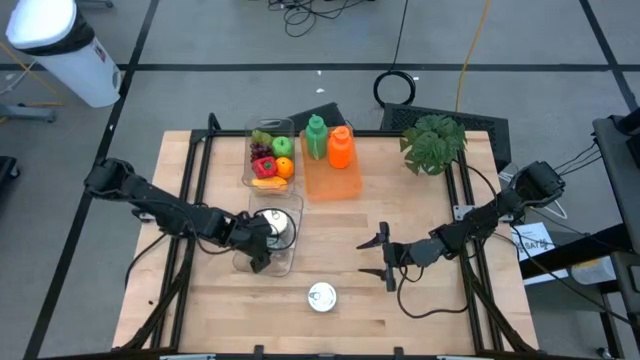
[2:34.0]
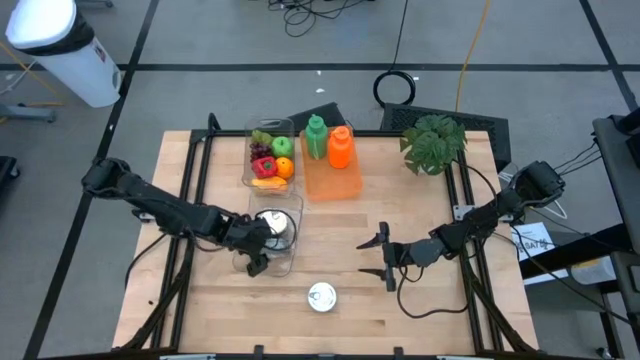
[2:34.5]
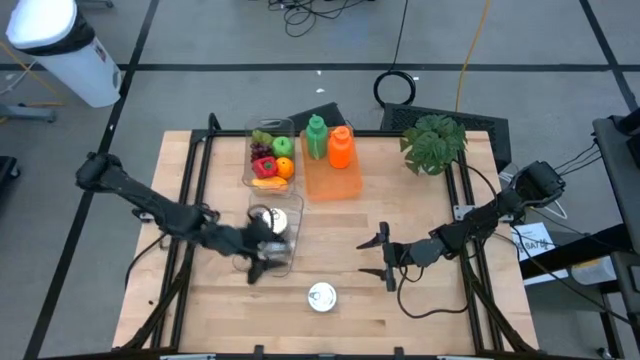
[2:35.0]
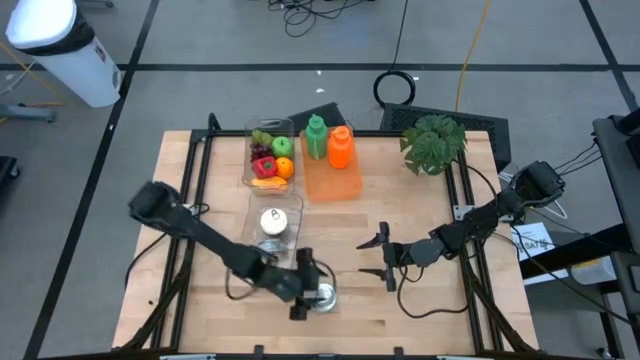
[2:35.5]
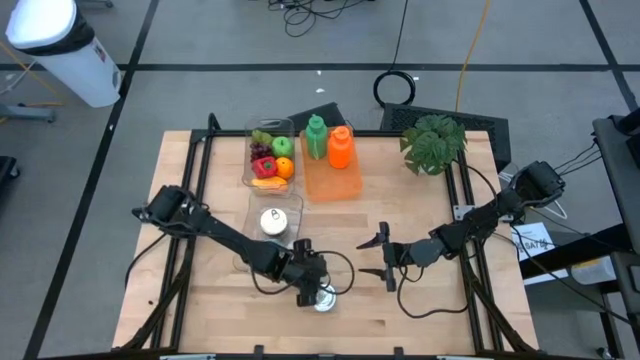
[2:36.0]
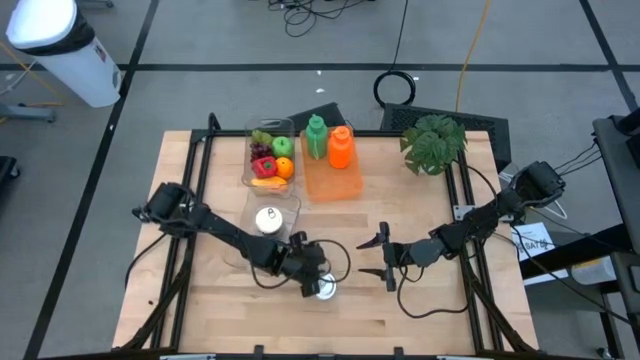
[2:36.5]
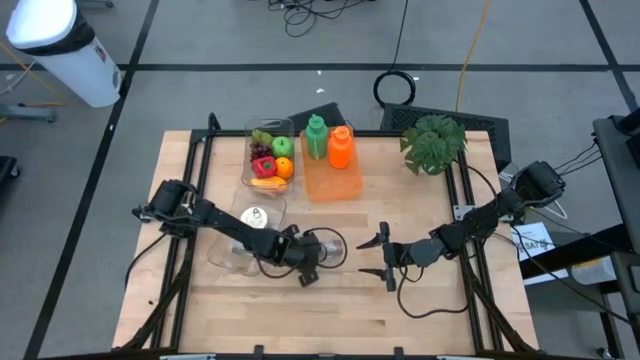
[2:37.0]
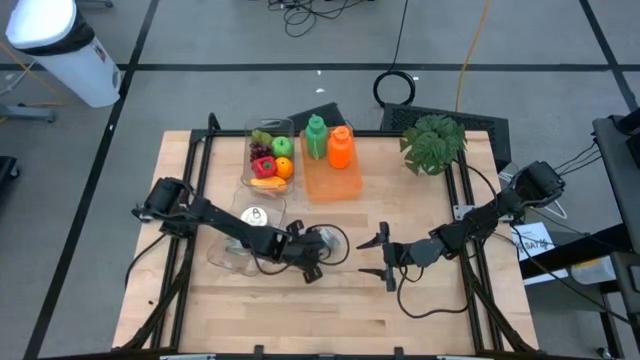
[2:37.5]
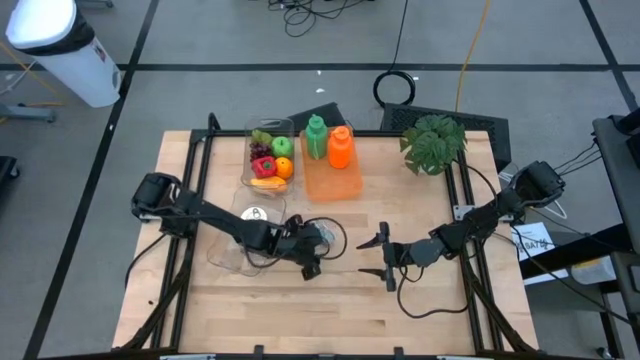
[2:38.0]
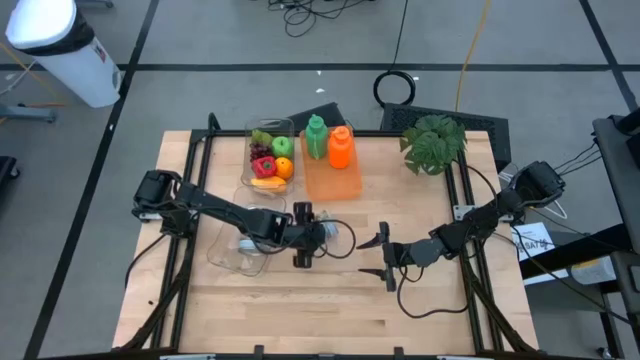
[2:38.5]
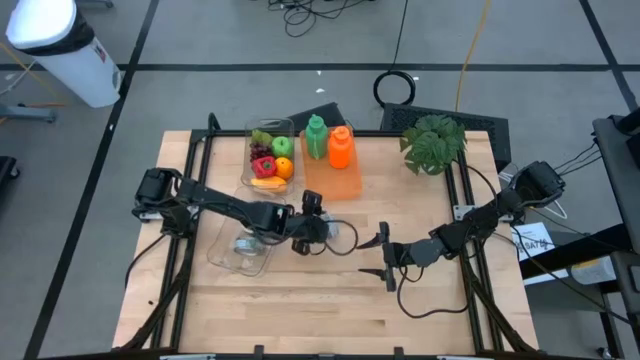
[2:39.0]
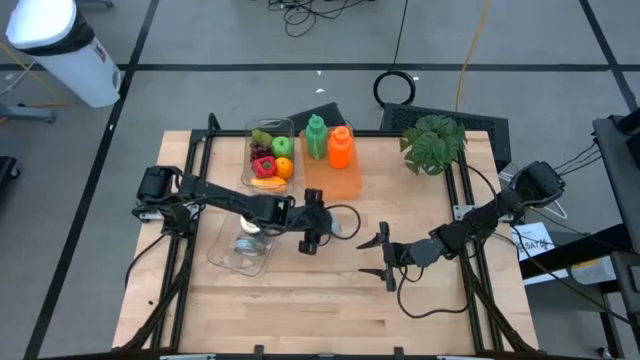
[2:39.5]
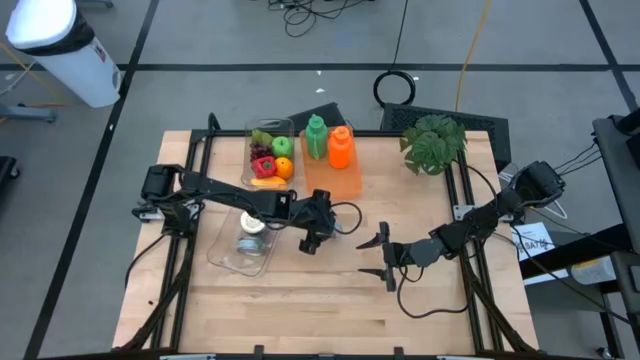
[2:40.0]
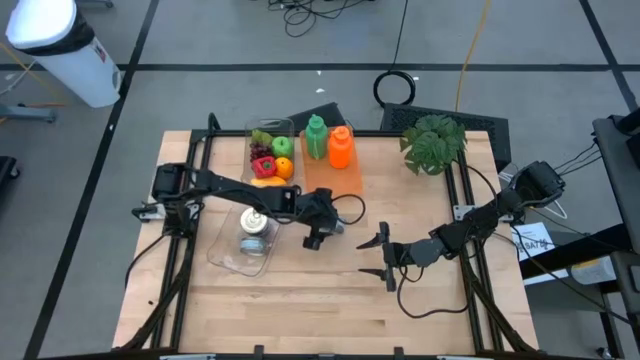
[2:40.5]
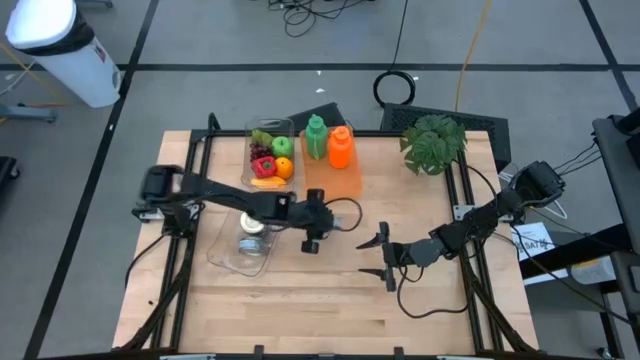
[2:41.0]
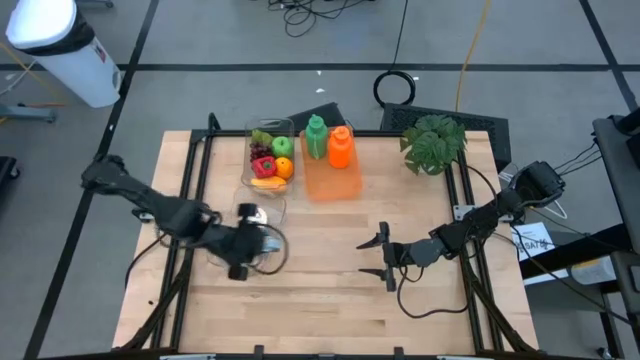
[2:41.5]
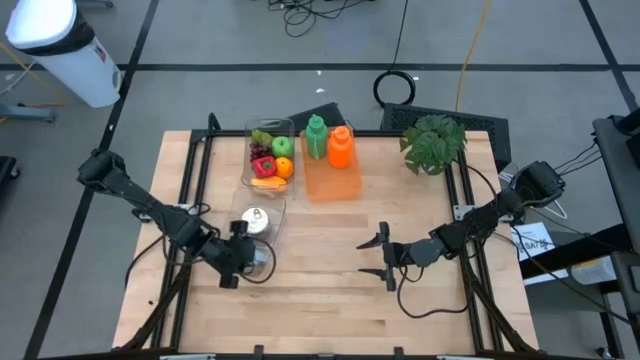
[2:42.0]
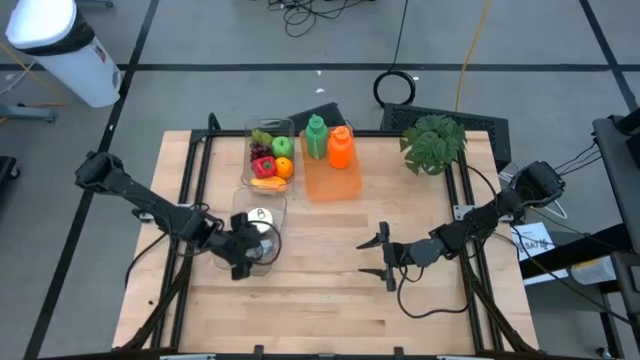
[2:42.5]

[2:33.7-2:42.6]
Task: Pick & Place Food Item
Put the green tuna can into the bottom transparent bin

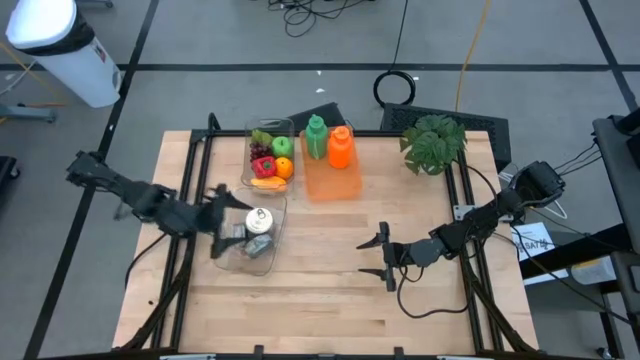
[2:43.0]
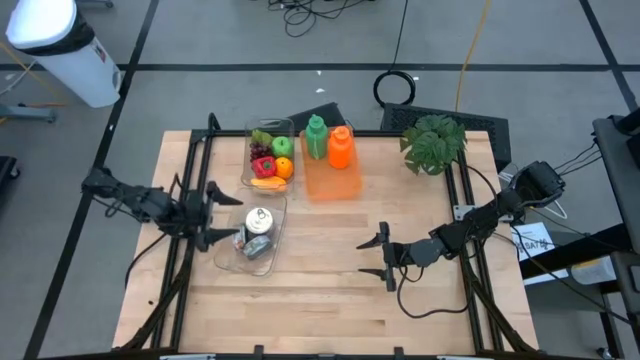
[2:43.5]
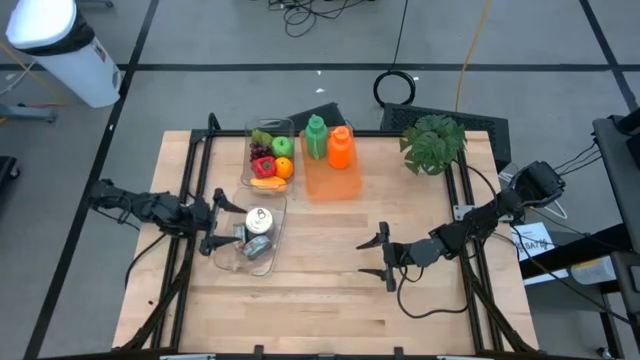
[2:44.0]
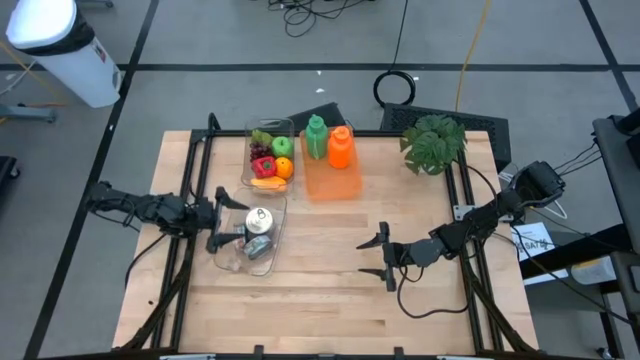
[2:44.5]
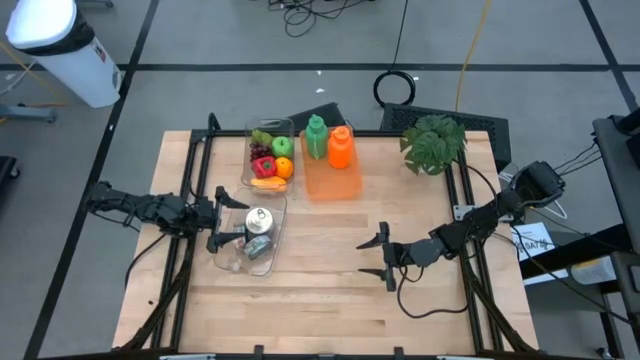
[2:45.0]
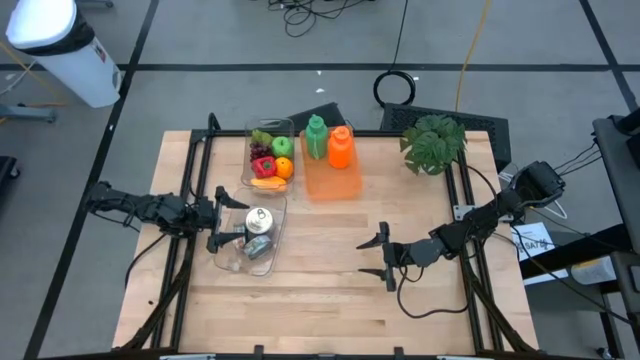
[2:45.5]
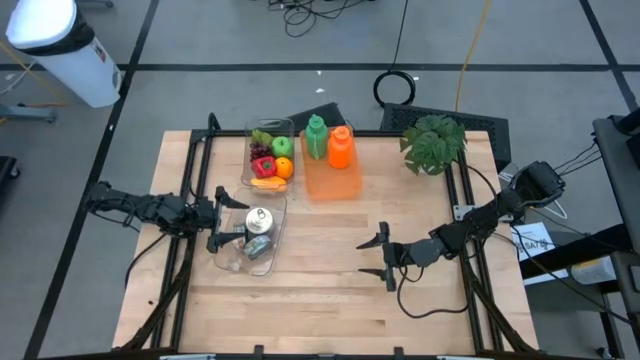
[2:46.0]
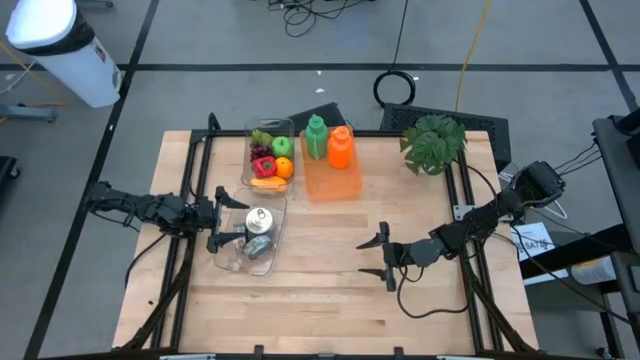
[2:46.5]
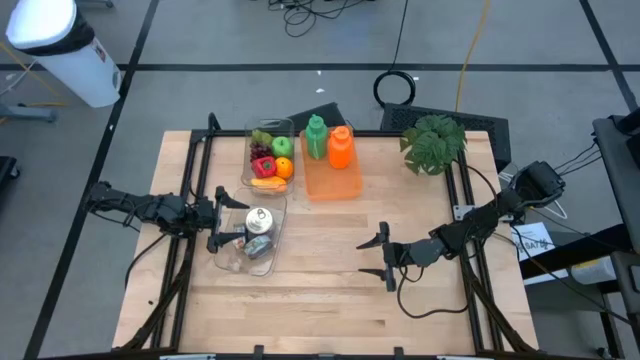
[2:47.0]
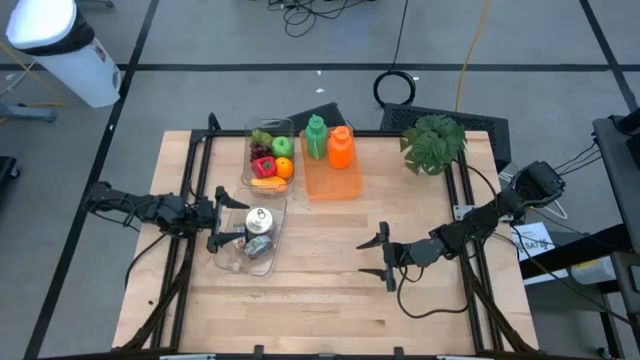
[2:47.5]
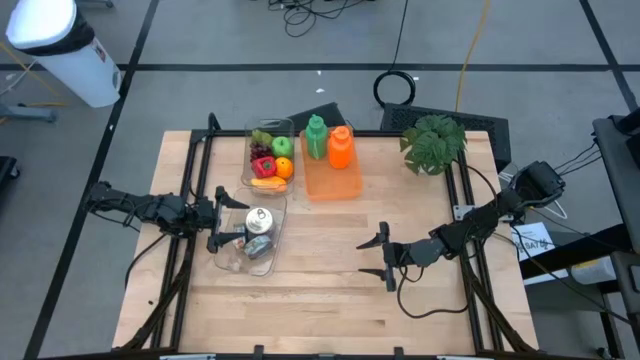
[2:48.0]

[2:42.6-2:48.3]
Return to Home Position

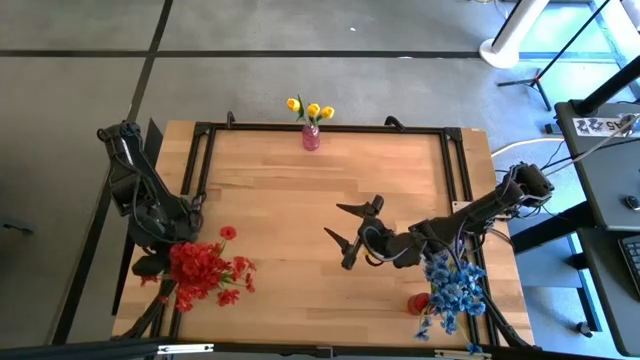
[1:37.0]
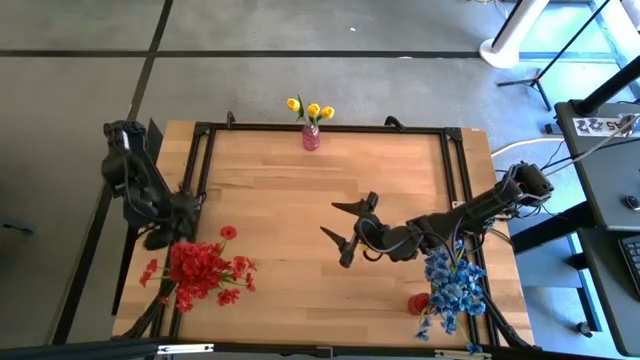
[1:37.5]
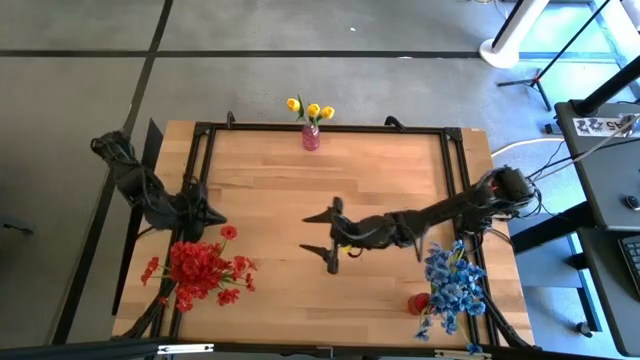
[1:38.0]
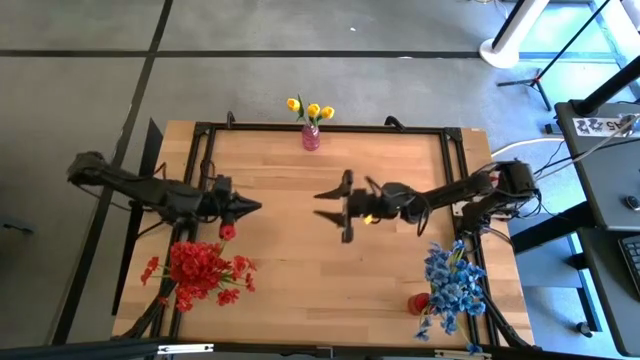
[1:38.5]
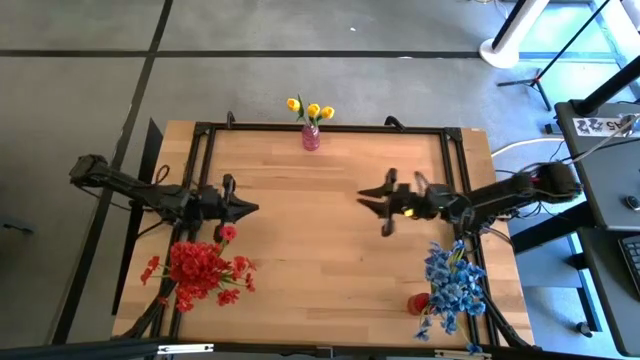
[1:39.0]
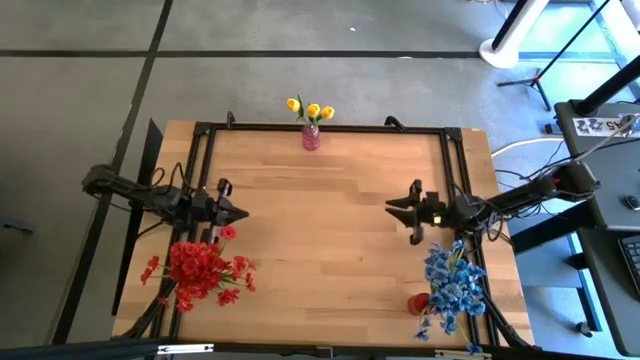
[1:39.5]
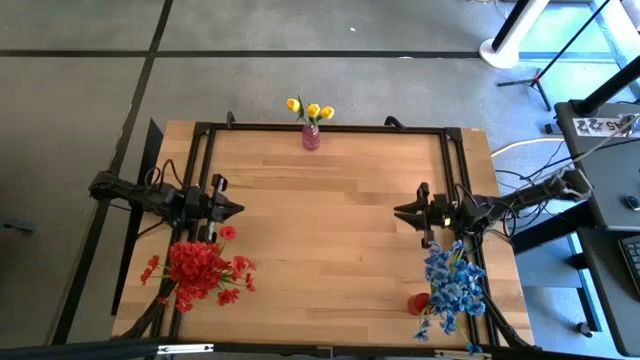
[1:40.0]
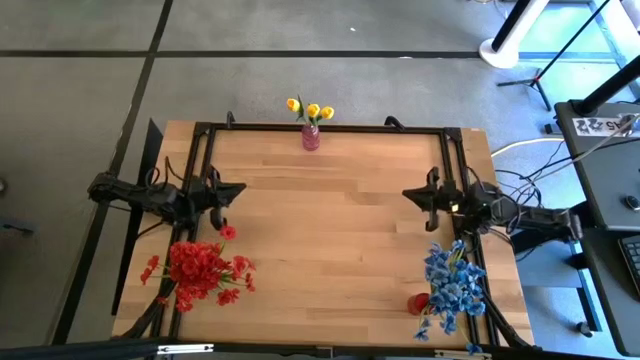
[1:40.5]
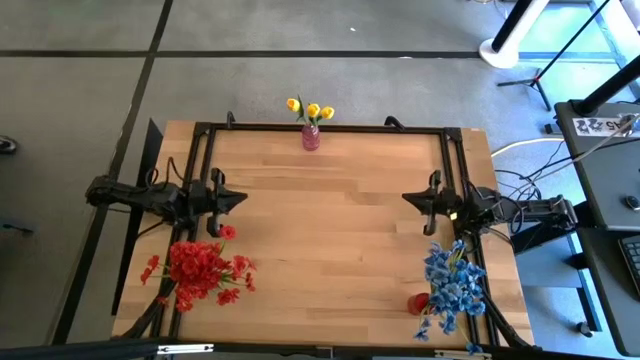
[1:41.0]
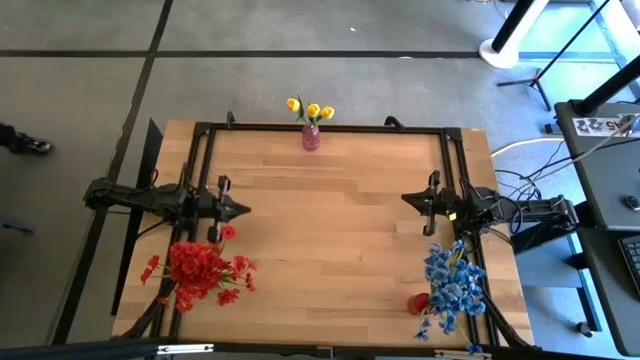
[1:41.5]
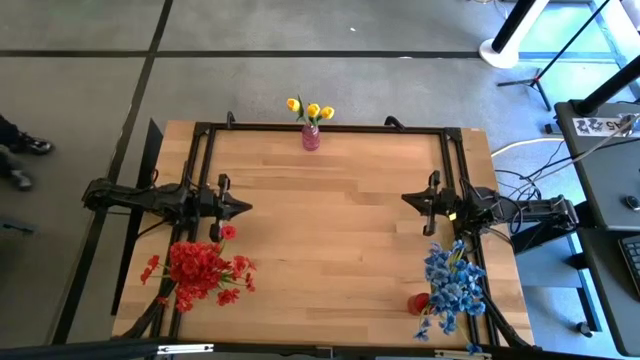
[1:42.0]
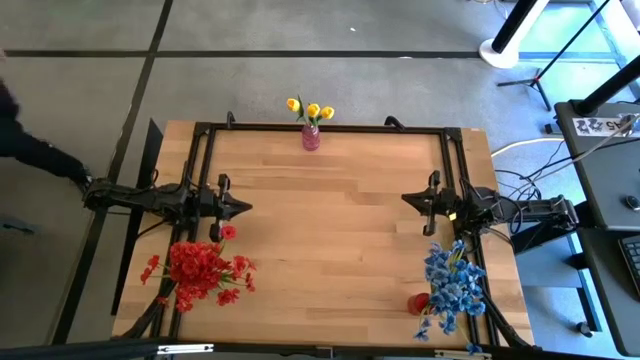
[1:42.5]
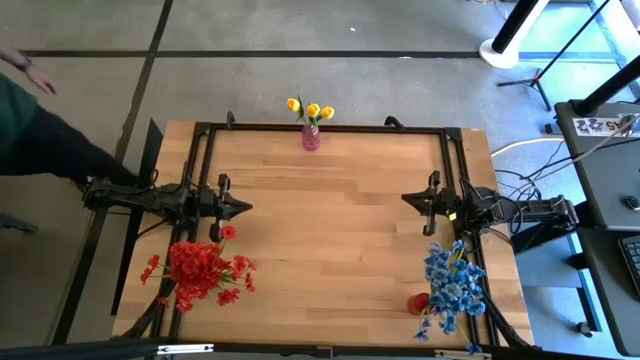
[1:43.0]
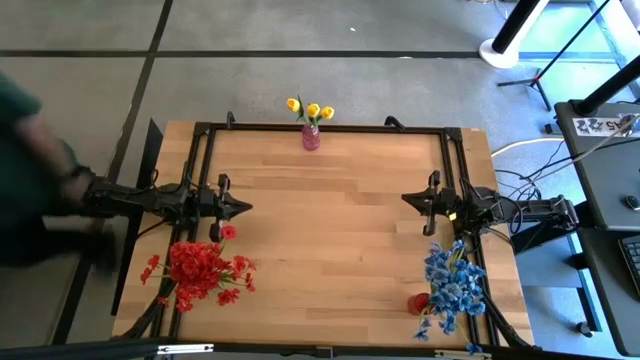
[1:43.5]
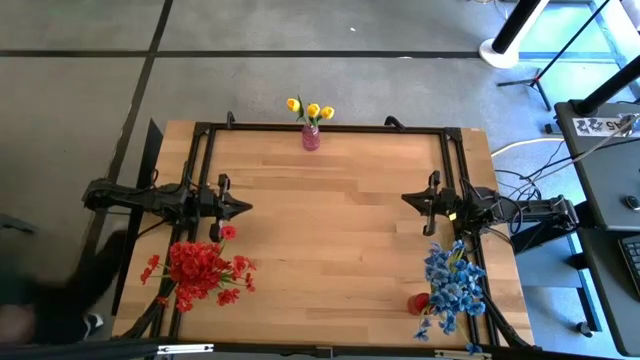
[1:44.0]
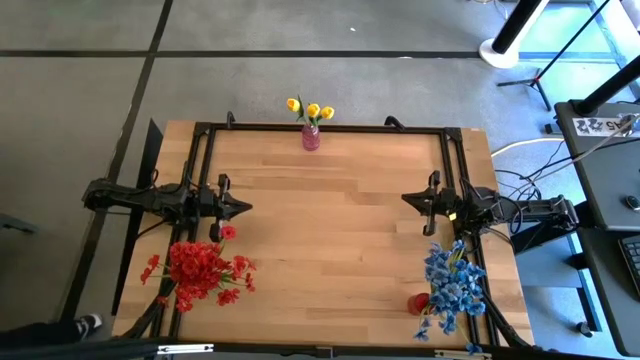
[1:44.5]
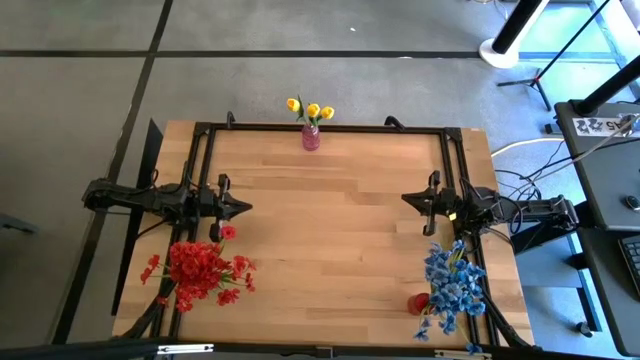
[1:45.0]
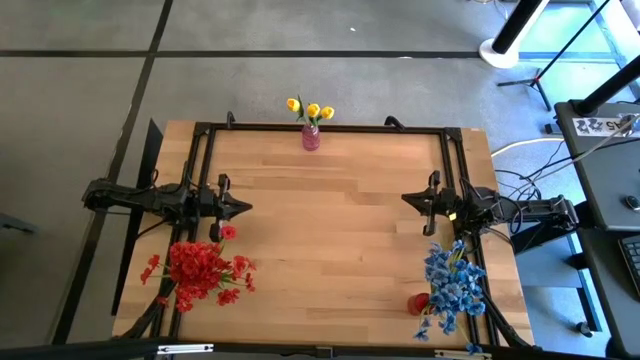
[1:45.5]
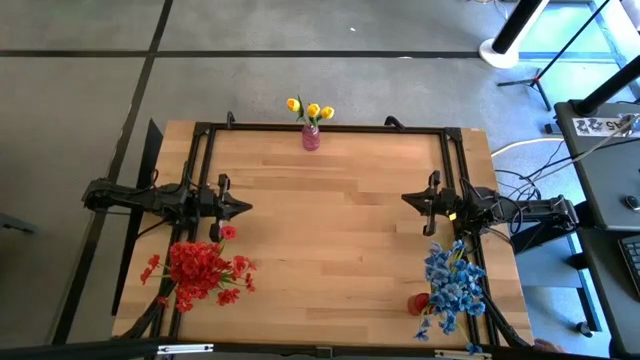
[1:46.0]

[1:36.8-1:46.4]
Task: Sort flowers into vase by color
Return to Home Position
